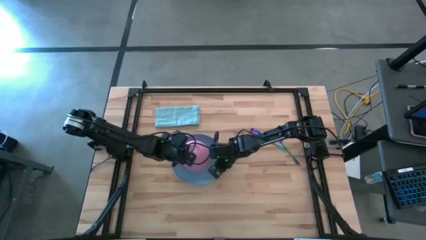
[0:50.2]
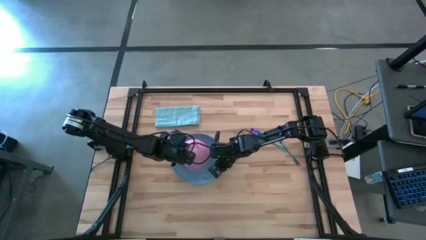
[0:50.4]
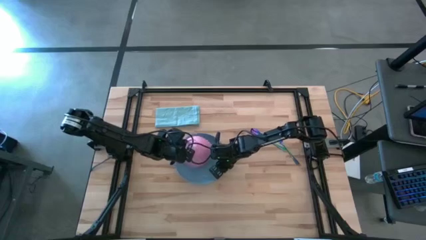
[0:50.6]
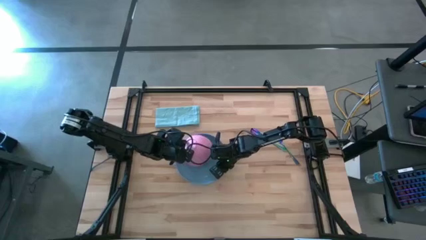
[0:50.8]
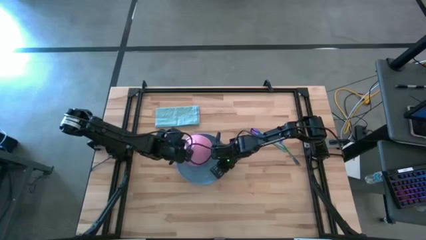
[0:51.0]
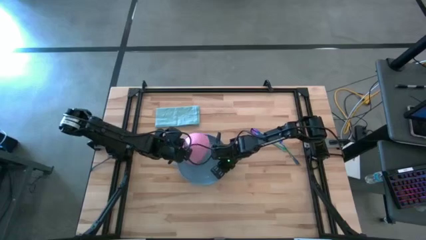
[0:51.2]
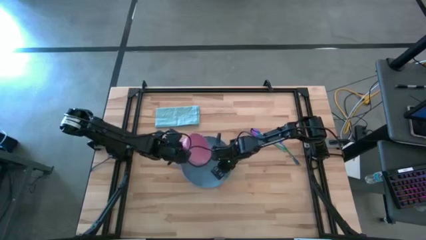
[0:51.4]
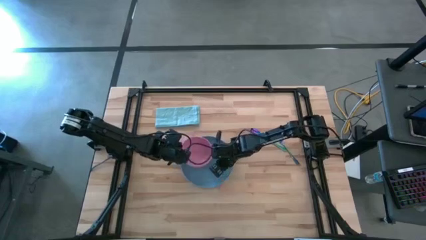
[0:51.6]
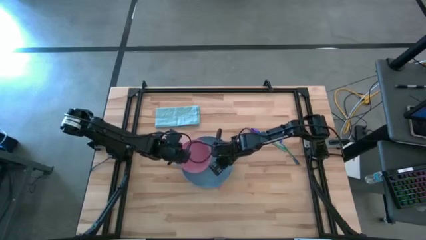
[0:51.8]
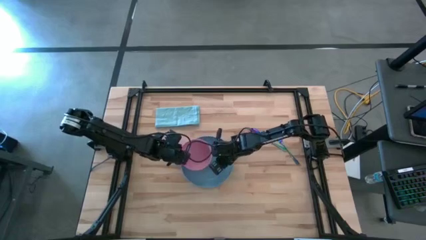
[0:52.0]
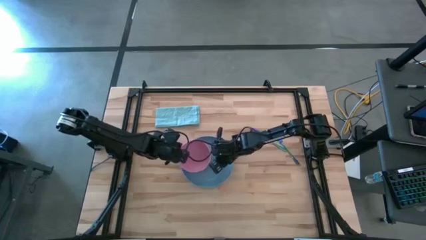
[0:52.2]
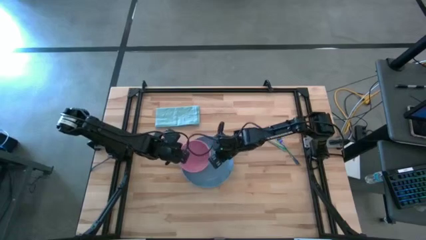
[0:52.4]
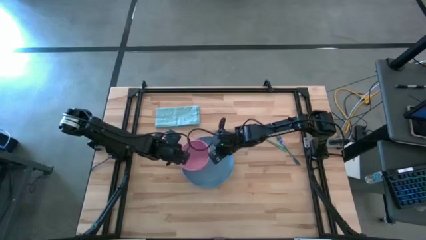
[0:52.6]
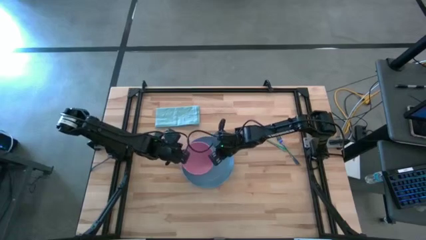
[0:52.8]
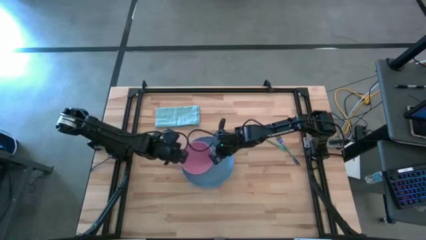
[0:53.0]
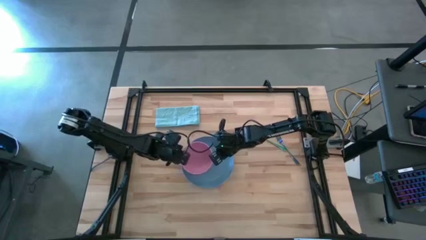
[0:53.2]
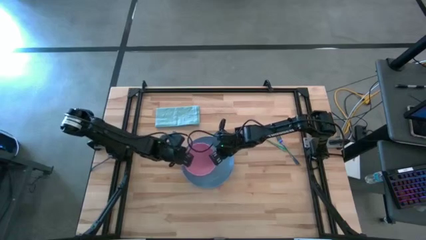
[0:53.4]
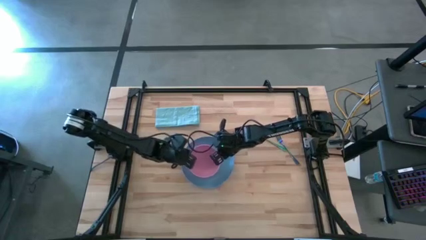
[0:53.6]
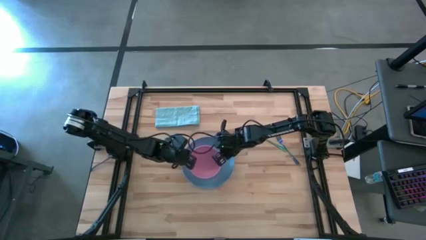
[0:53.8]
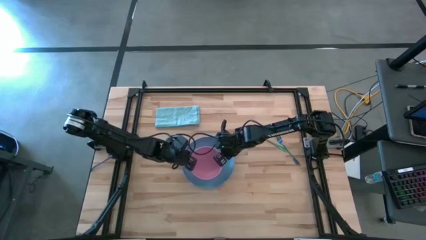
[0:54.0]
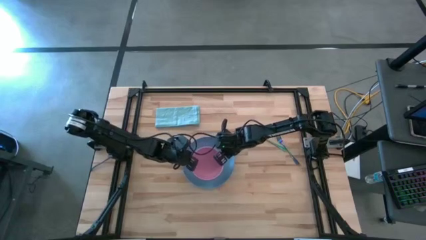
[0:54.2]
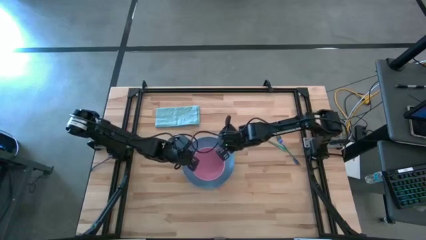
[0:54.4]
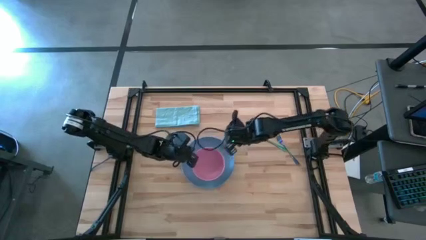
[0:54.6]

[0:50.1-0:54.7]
Task: Set table place
Adjust the position of the pink bowl upward

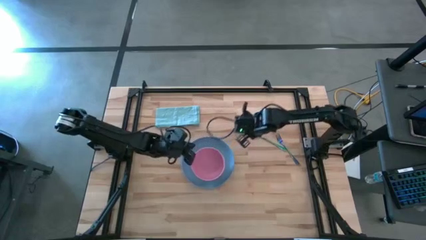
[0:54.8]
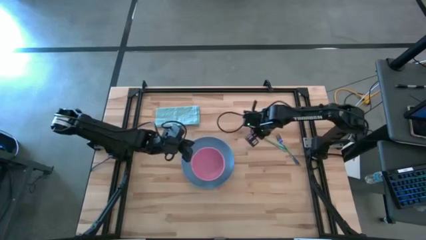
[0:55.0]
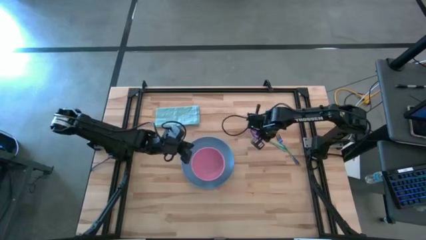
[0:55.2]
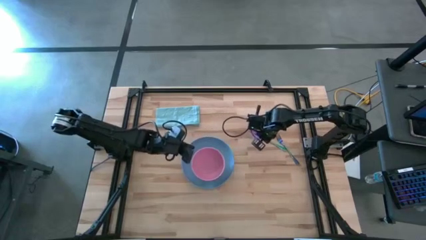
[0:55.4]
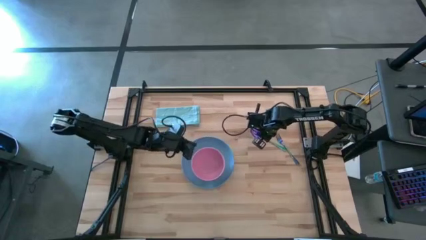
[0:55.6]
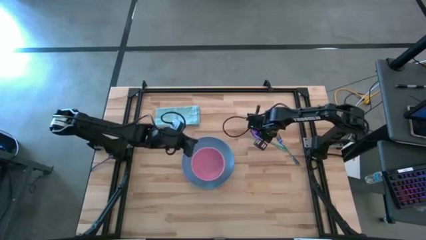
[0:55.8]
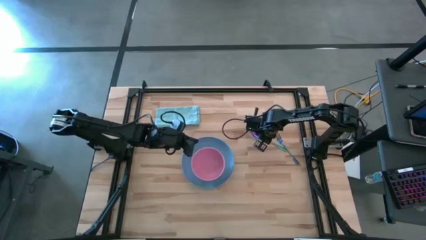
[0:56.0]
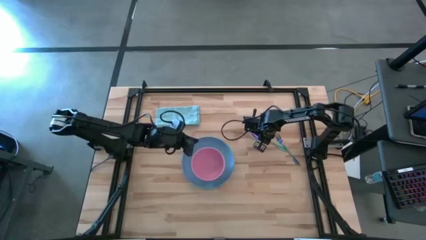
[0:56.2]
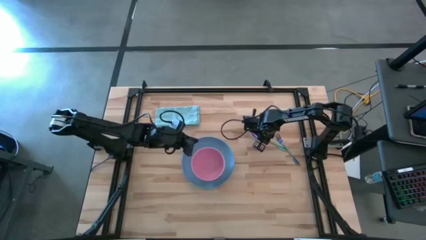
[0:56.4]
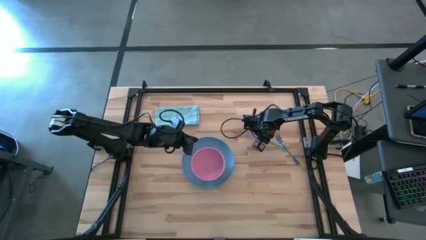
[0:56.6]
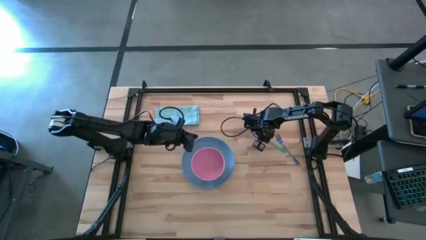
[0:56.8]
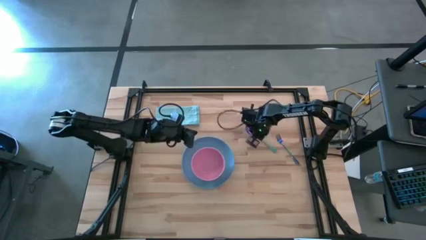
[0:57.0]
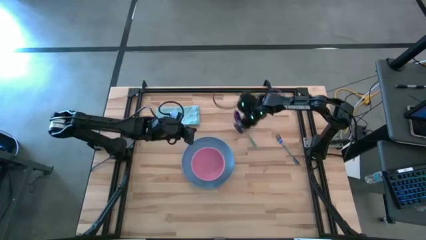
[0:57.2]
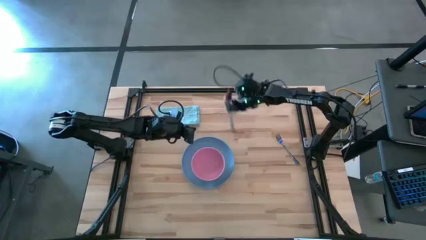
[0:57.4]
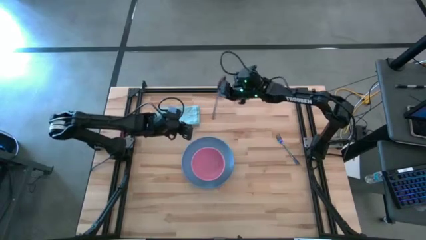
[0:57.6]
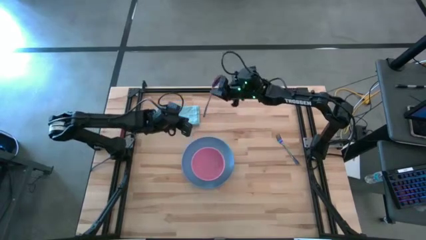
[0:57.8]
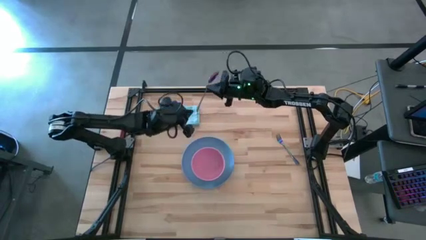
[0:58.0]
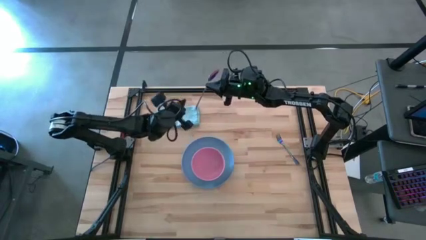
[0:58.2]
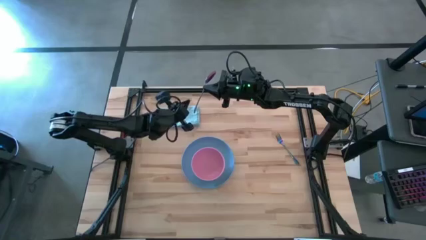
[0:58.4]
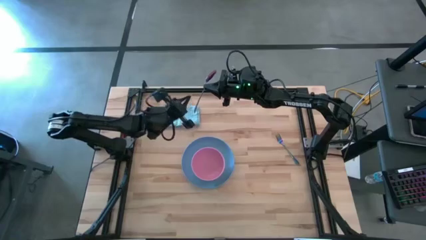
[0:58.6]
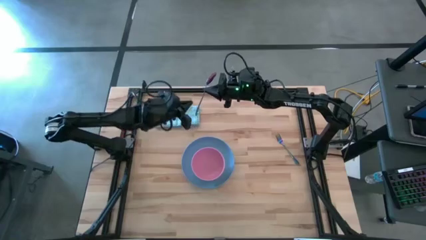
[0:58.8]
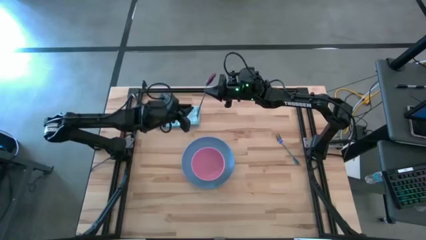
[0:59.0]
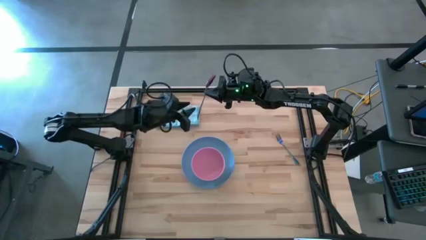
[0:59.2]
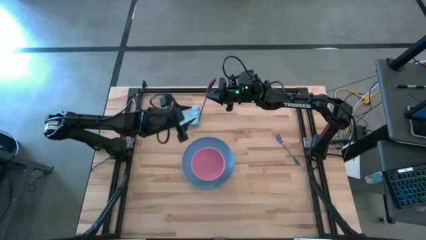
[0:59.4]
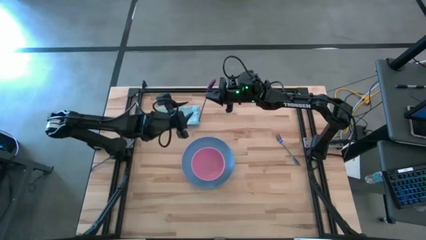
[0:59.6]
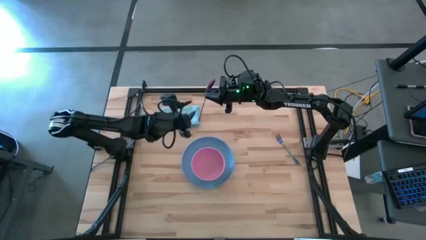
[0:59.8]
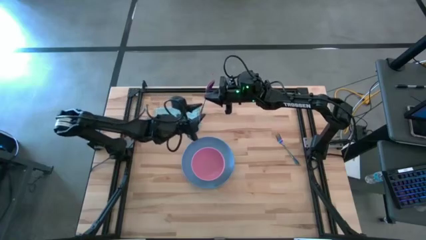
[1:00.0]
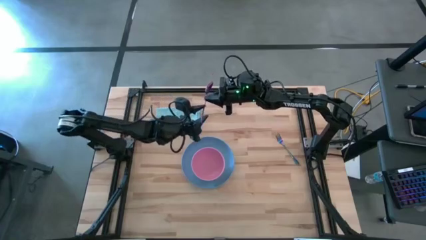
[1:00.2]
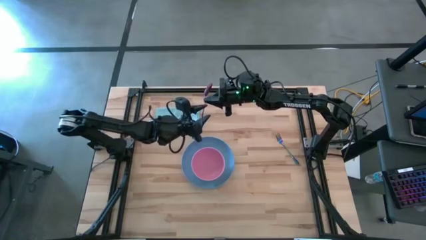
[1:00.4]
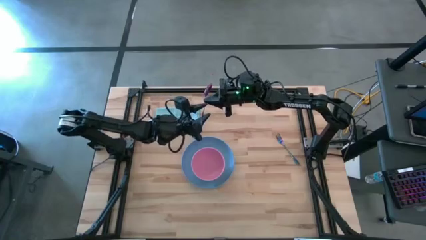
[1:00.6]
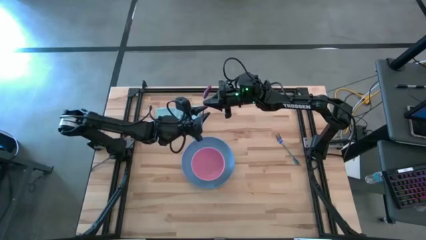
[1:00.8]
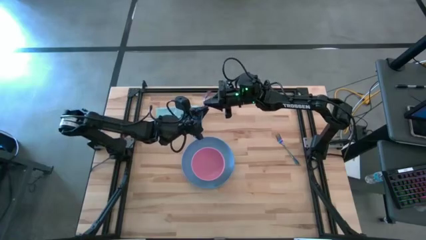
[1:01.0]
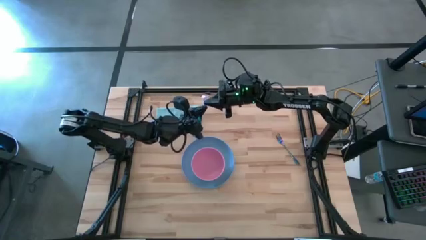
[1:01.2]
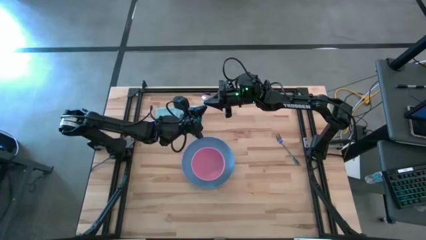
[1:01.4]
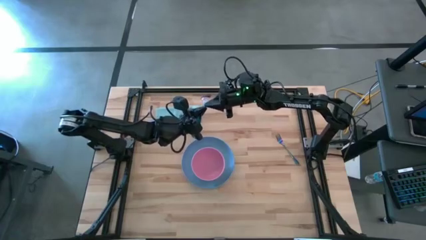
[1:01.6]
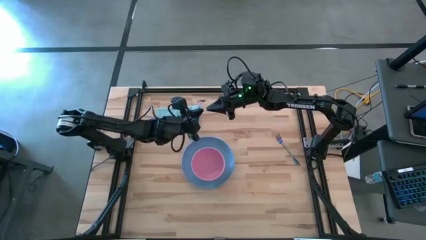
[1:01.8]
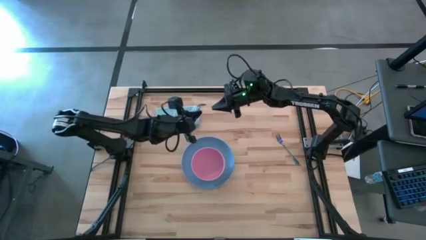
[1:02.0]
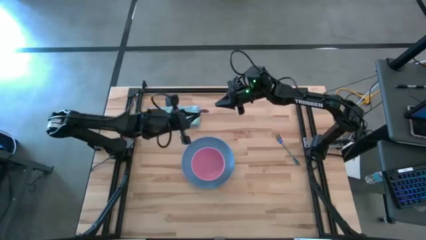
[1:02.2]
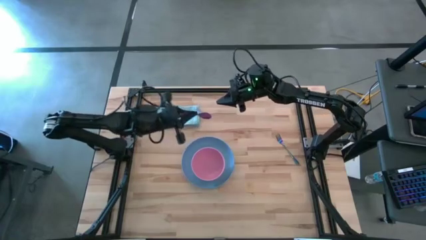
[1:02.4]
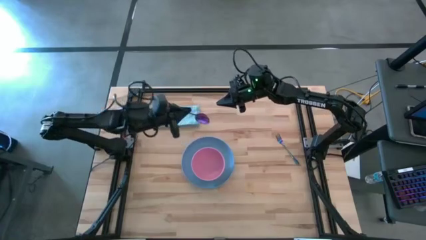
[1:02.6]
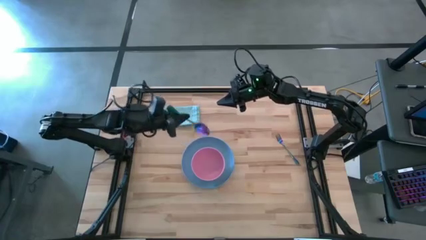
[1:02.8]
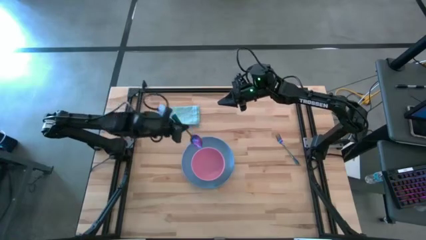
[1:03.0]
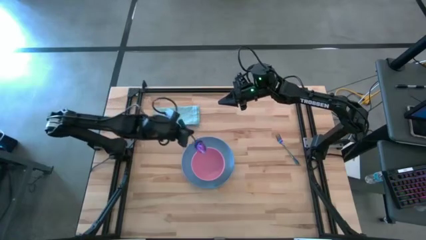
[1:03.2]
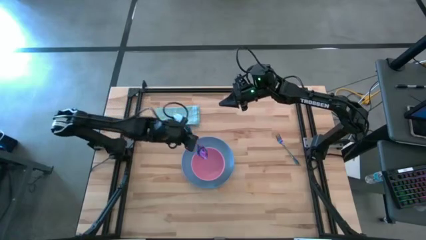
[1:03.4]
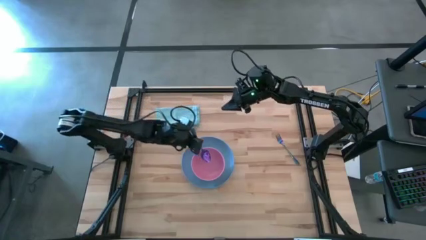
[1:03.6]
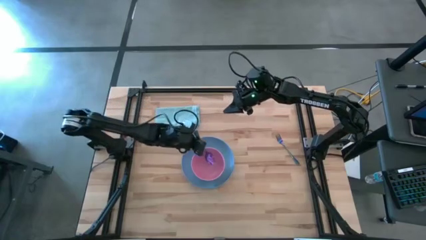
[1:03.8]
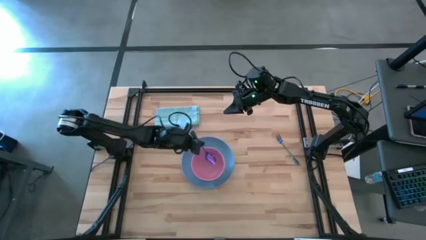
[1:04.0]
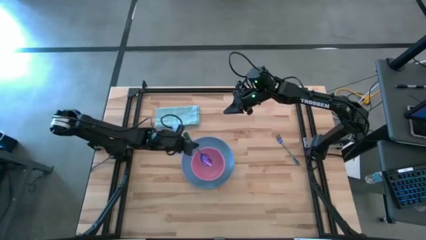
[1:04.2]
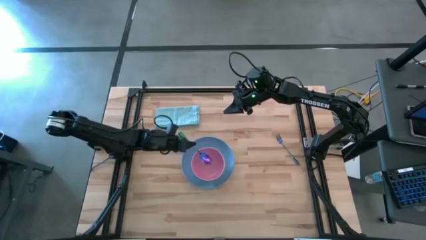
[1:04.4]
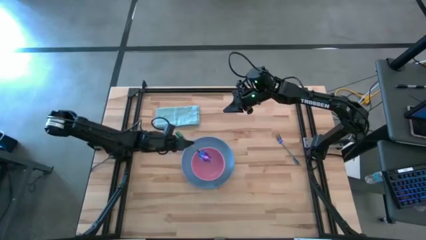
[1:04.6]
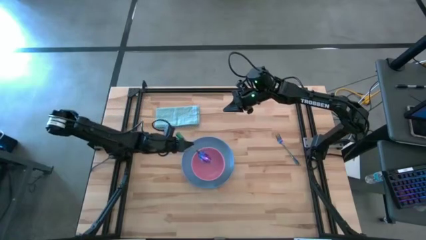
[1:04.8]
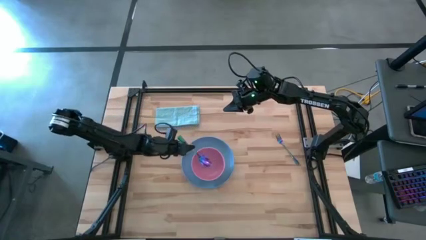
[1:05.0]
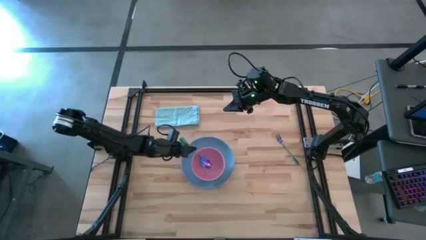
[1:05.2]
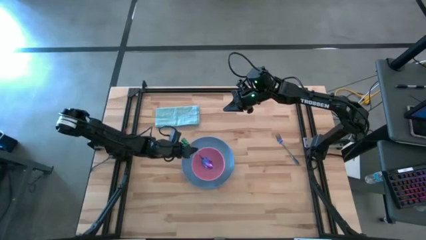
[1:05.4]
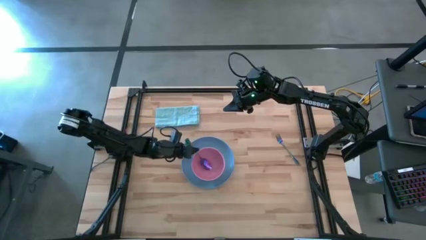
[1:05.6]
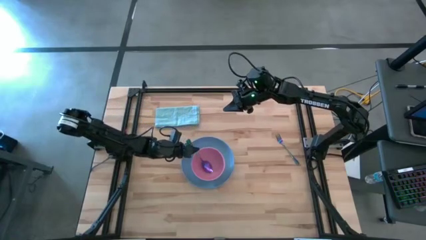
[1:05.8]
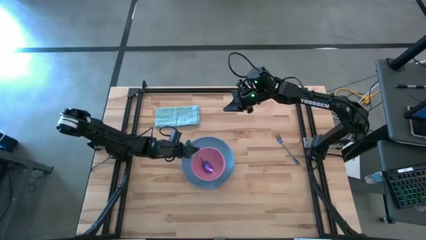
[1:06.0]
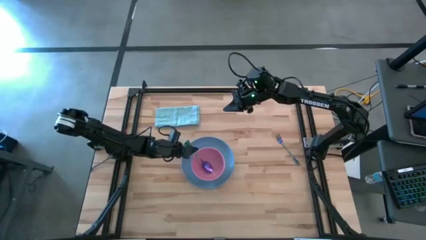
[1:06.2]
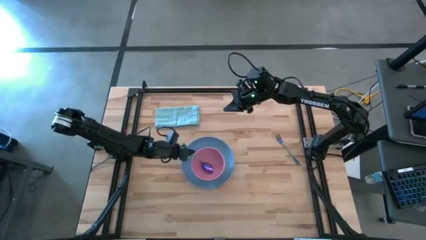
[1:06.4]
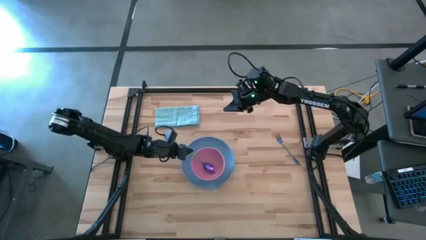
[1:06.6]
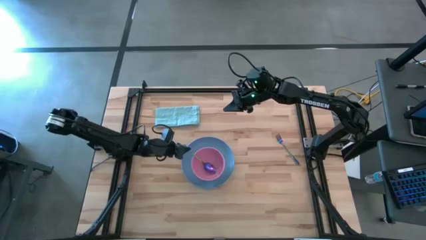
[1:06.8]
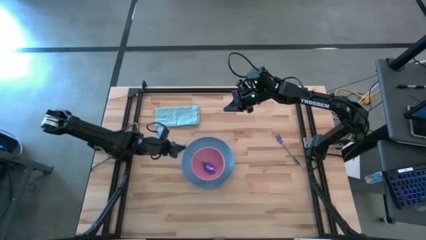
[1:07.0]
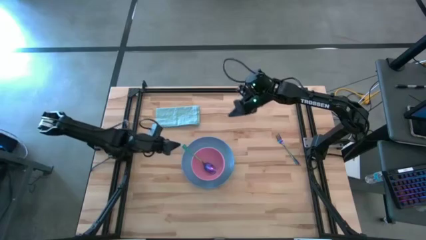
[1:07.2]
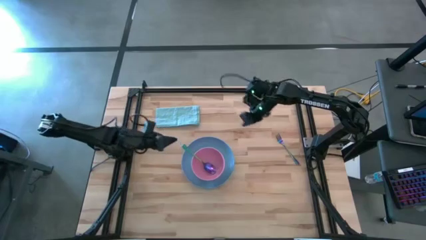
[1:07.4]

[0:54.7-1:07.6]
Put the blue spoon on the blue bowl
